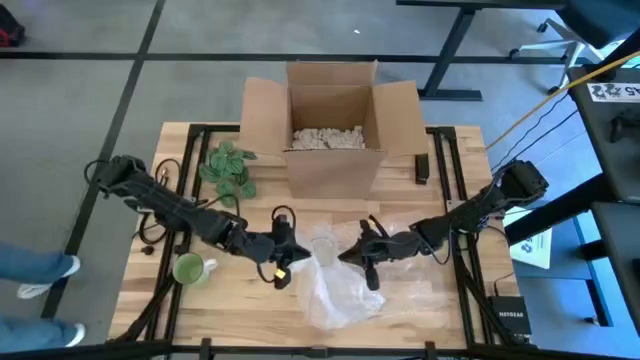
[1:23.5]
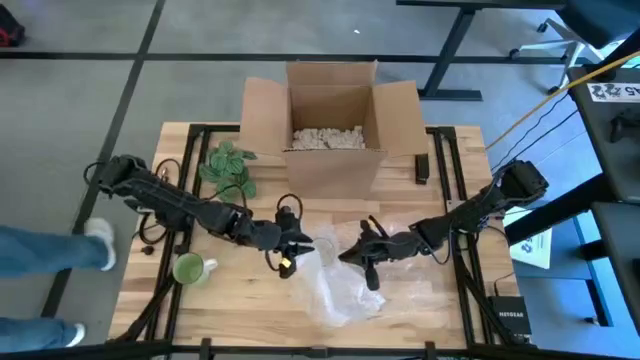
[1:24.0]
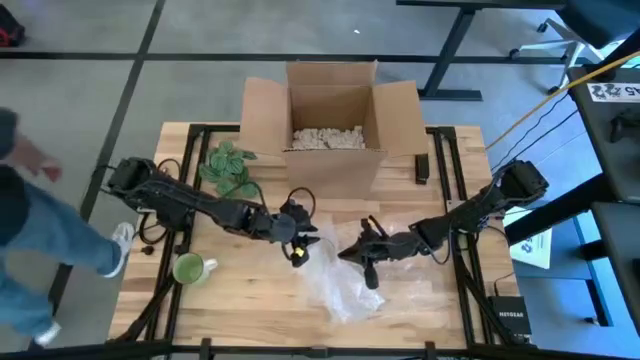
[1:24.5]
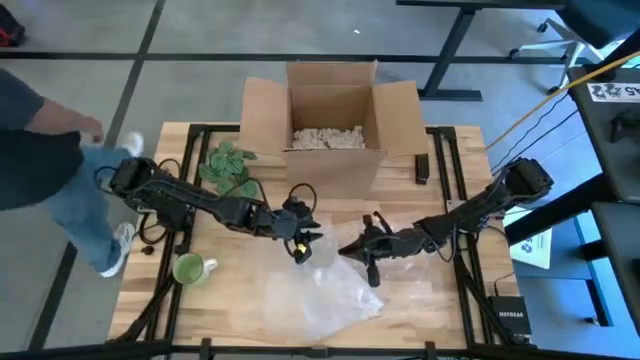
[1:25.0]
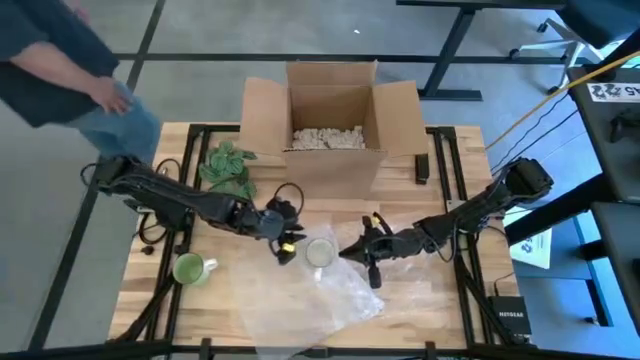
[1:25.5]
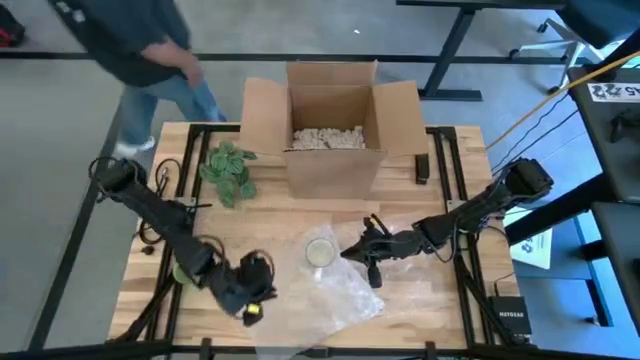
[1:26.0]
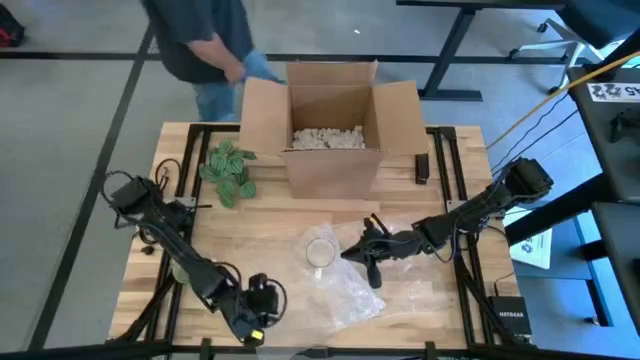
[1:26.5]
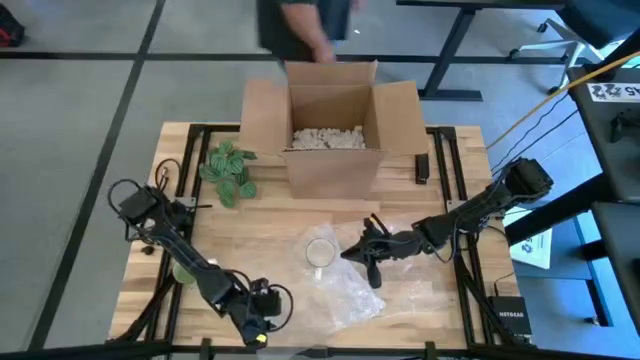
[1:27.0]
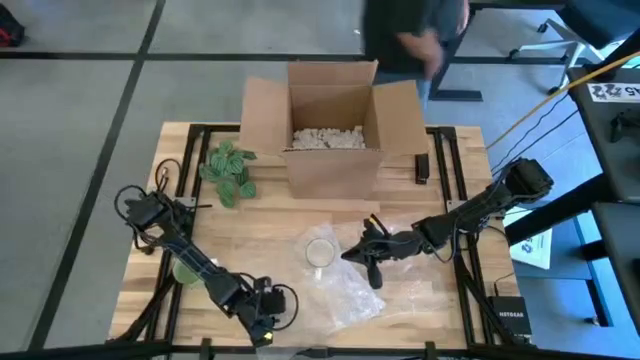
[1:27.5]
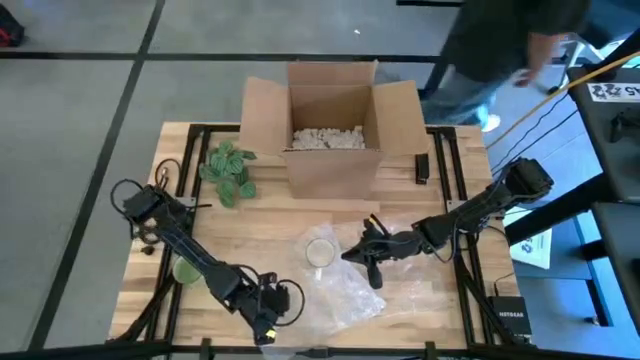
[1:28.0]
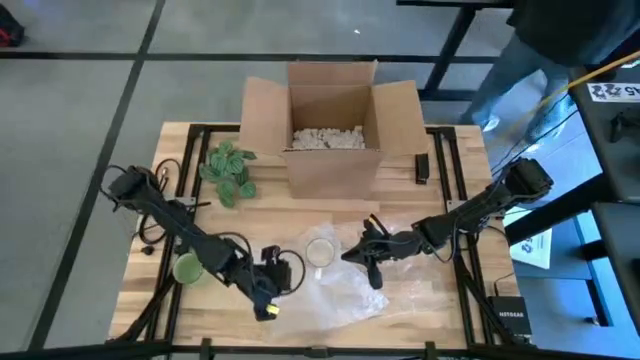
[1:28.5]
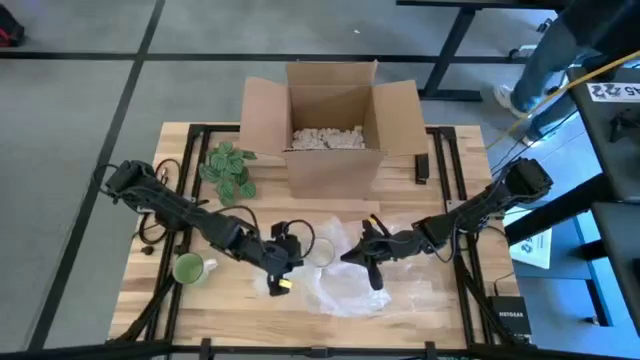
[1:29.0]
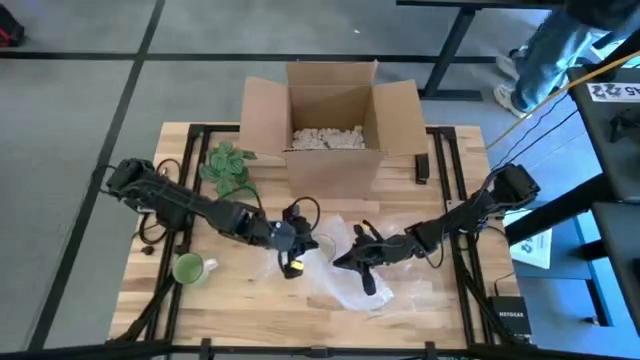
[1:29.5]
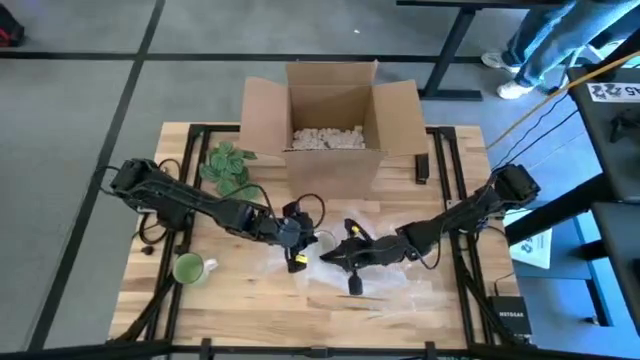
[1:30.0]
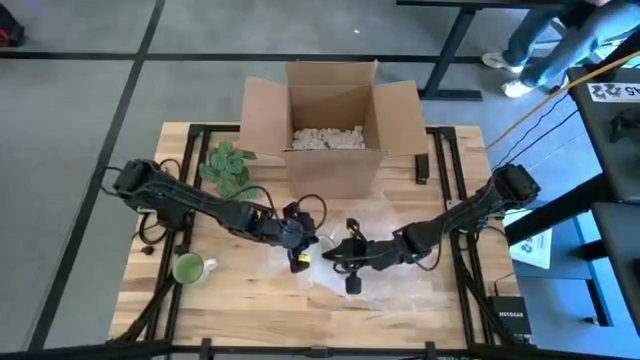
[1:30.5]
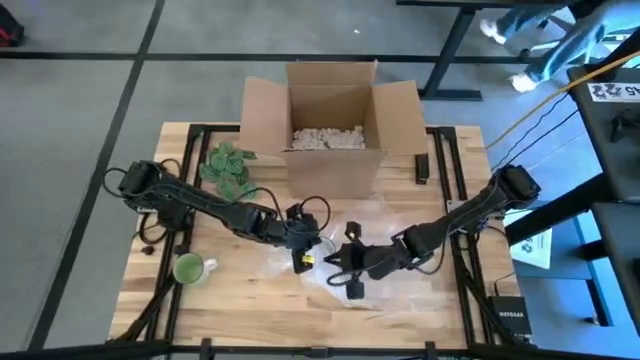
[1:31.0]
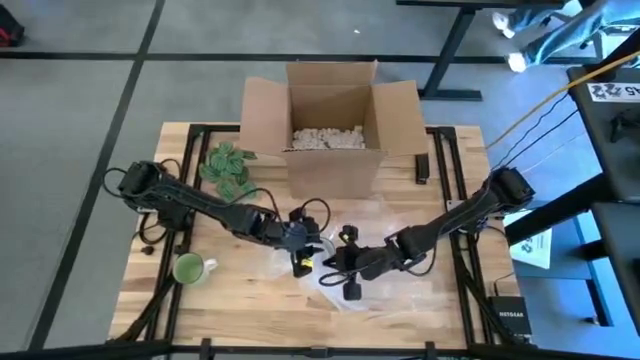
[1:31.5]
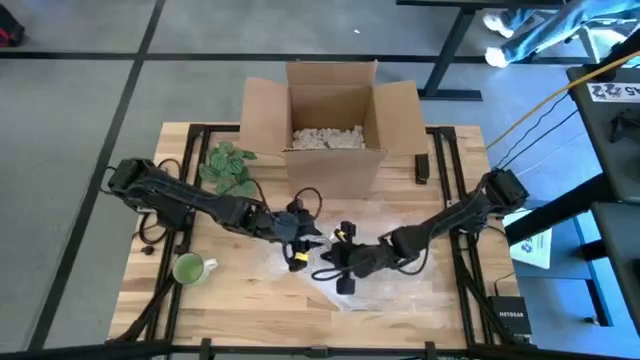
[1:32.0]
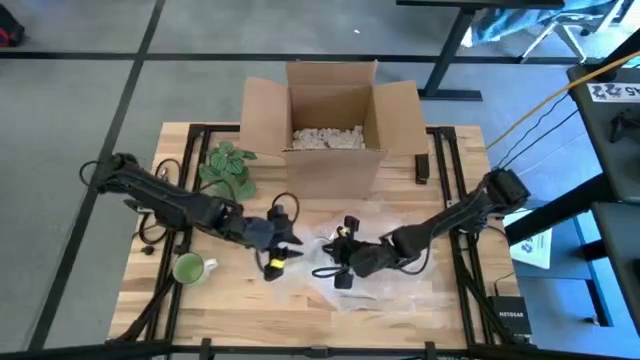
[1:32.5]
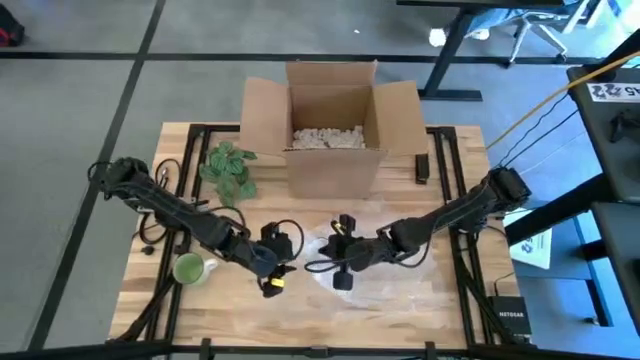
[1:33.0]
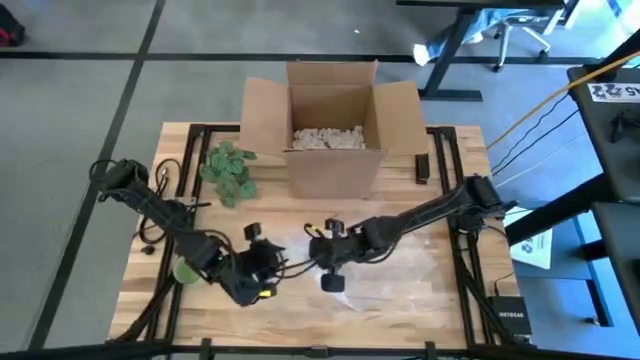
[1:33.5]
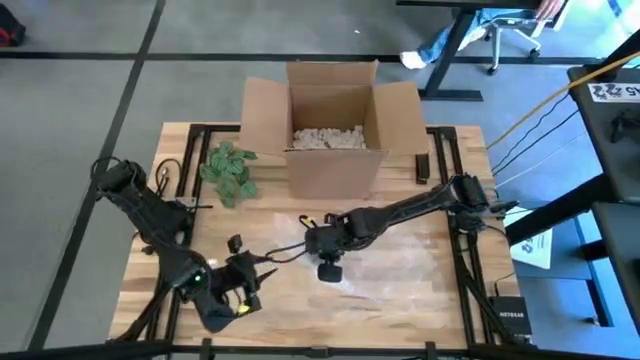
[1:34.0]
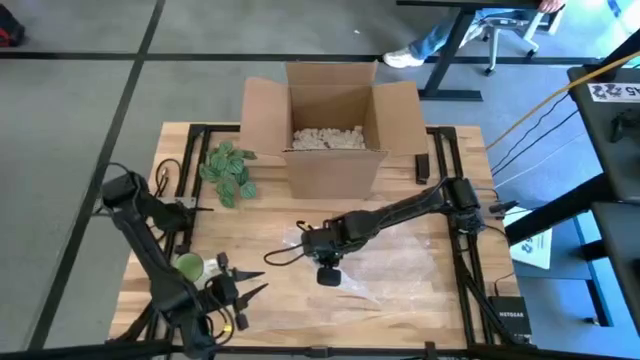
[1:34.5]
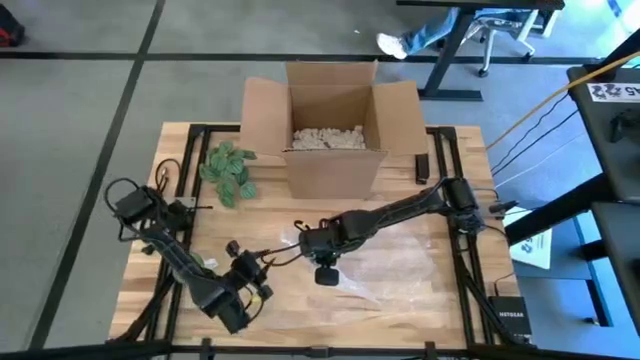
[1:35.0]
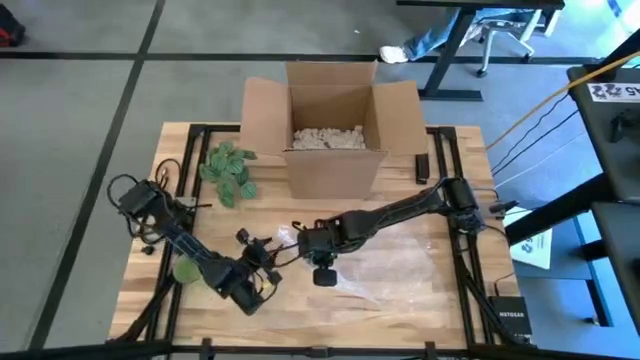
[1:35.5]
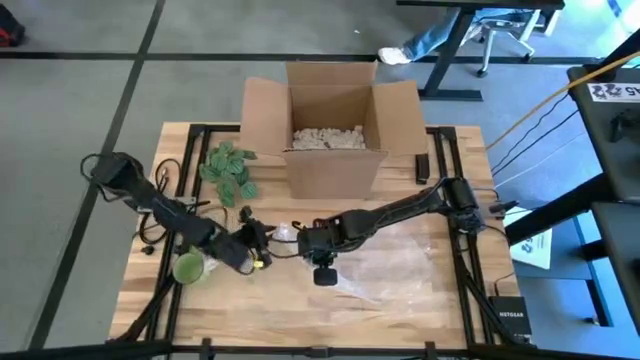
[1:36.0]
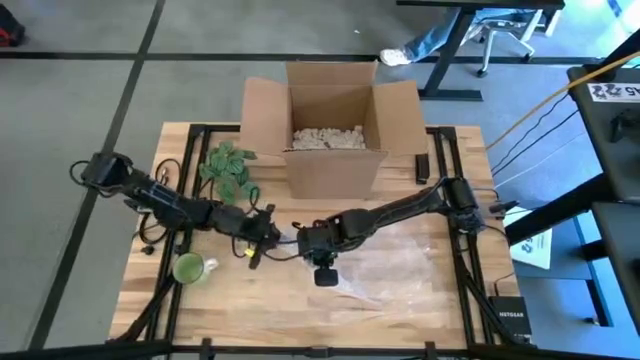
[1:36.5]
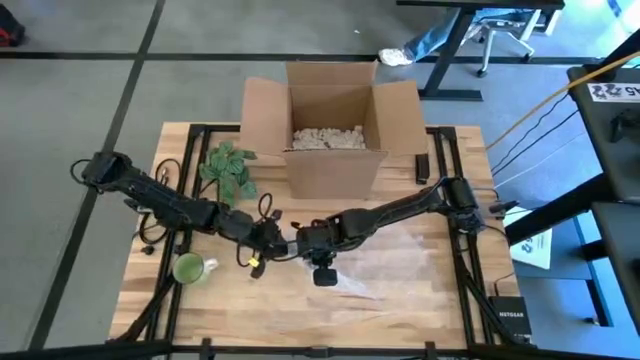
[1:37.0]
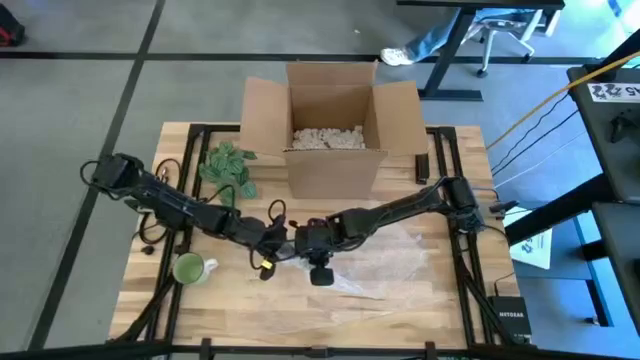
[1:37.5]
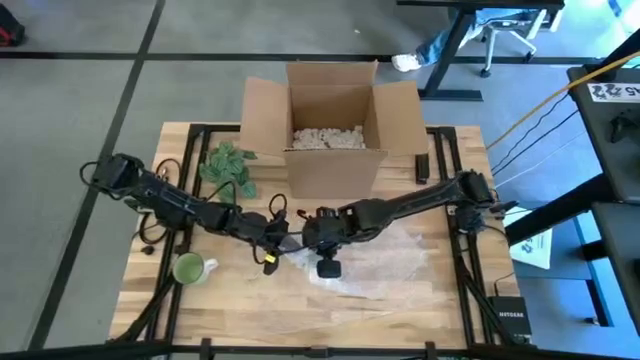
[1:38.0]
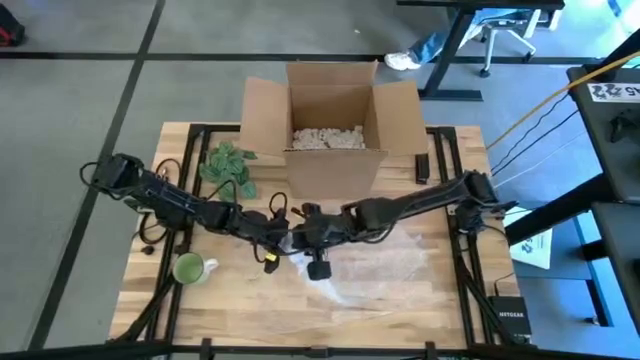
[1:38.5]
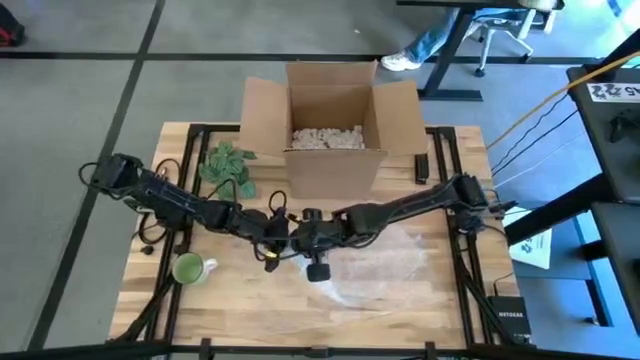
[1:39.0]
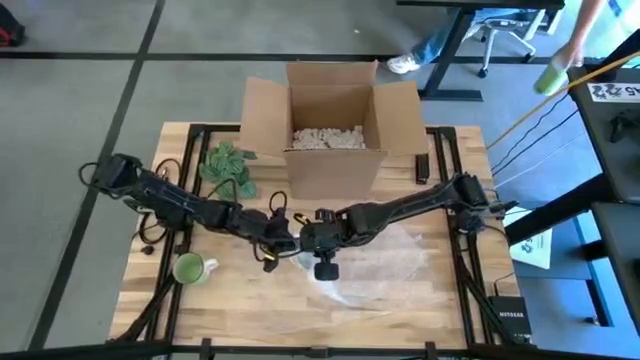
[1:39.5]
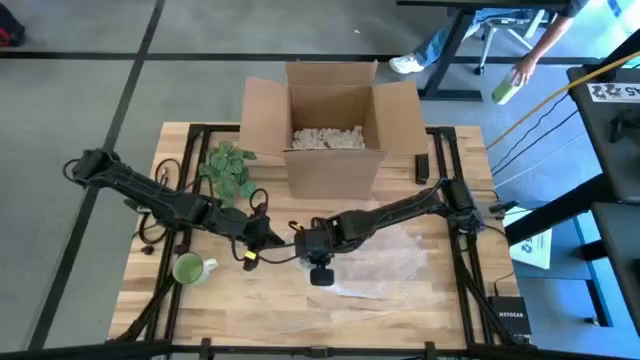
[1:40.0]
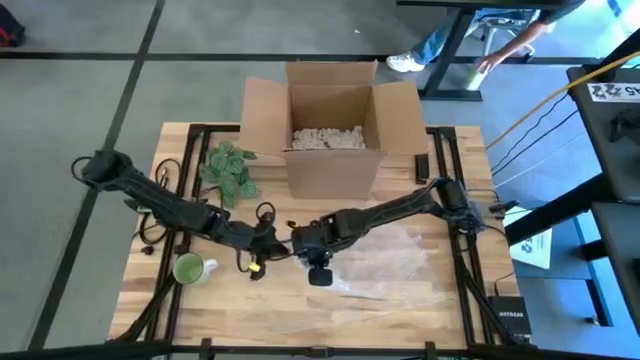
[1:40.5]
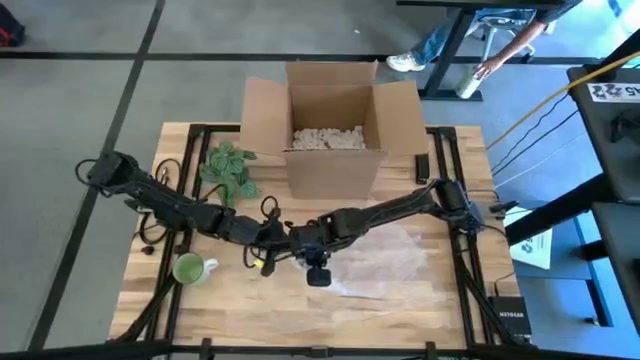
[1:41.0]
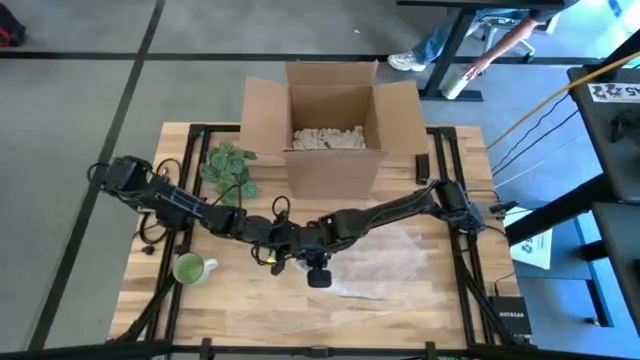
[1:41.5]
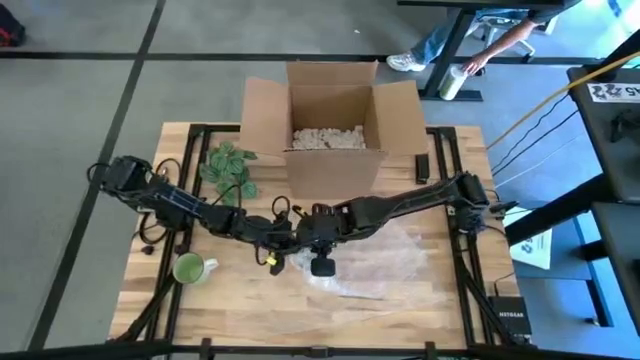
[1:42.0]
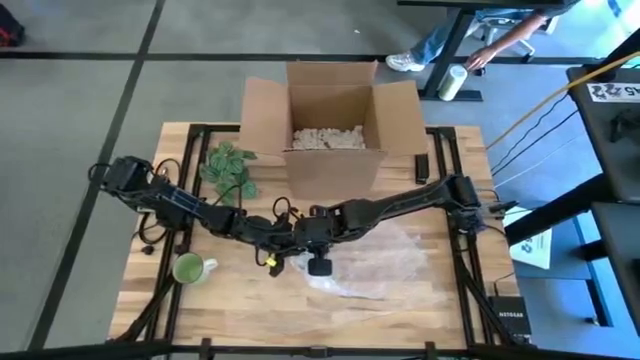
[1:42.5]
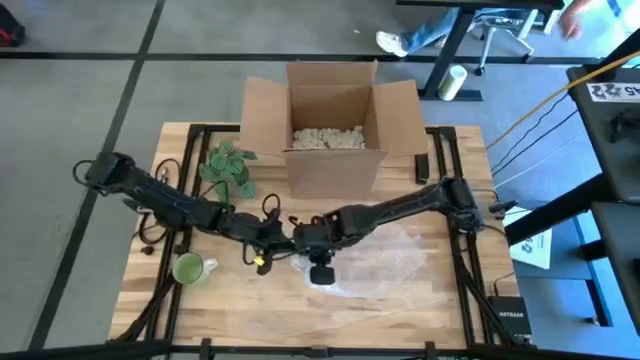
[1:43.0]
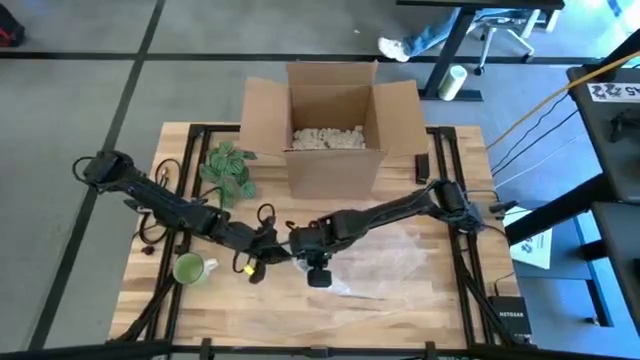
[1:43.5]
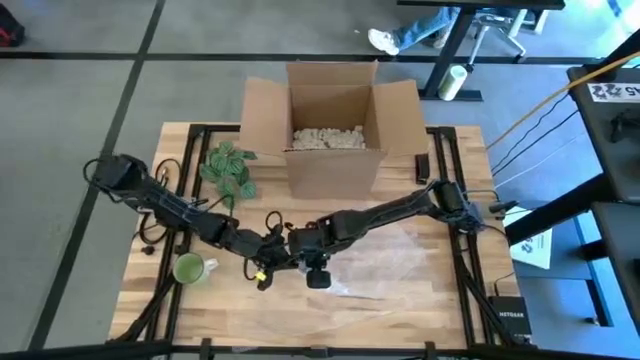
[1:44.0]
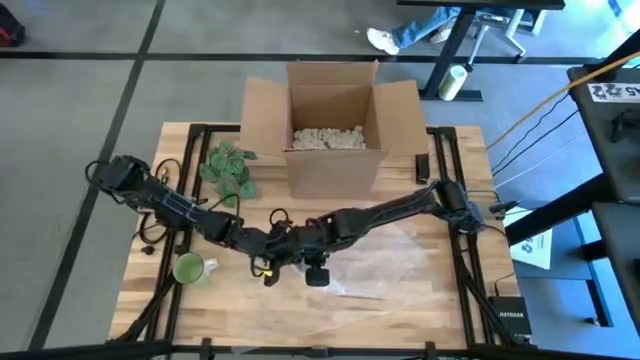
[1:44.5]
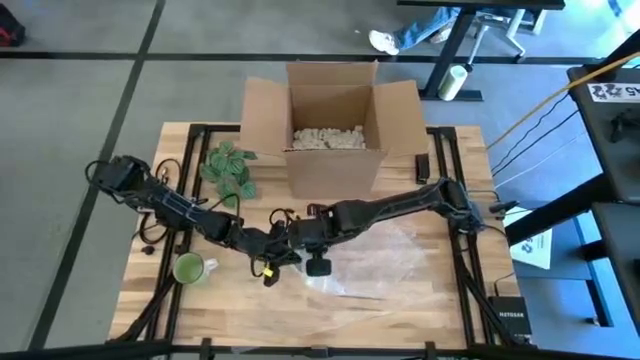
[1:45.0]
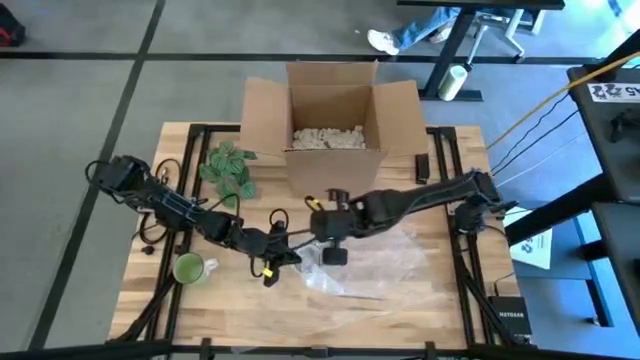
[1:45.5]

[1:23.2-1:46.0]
Task: wrap mug
Wrap the blue mug in bubble wrap
